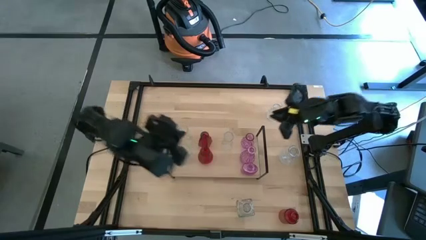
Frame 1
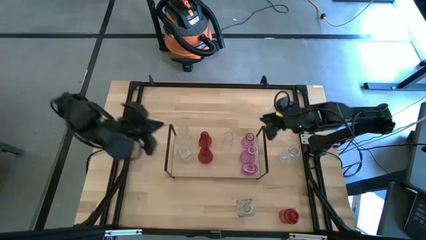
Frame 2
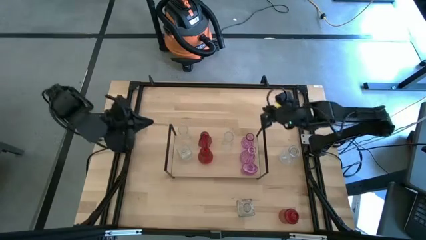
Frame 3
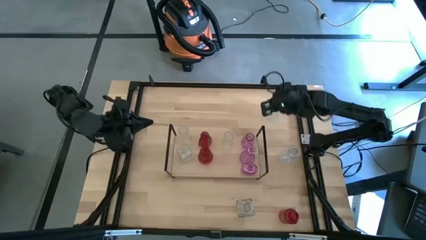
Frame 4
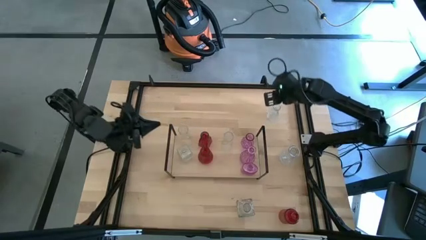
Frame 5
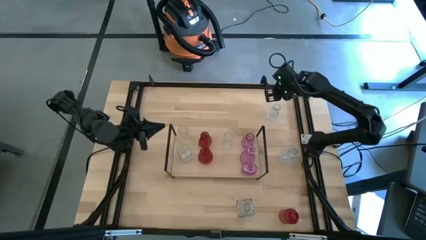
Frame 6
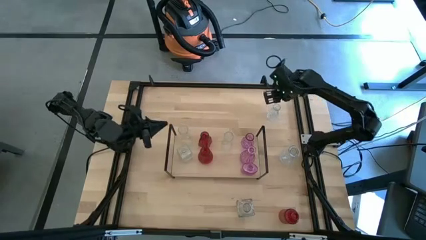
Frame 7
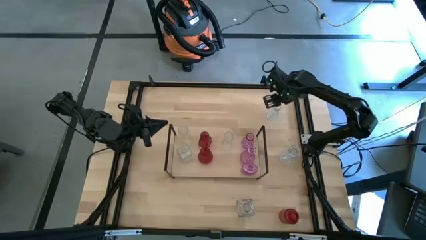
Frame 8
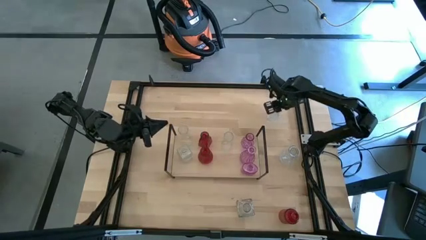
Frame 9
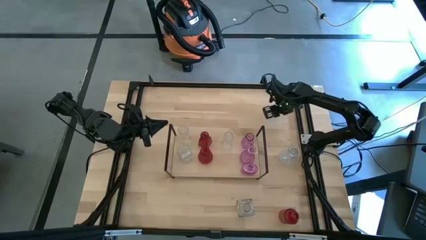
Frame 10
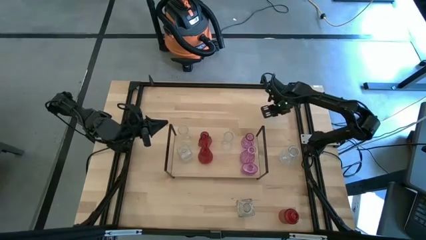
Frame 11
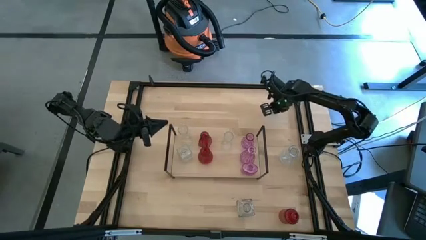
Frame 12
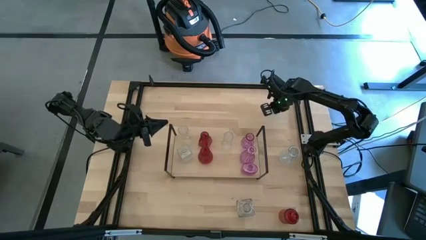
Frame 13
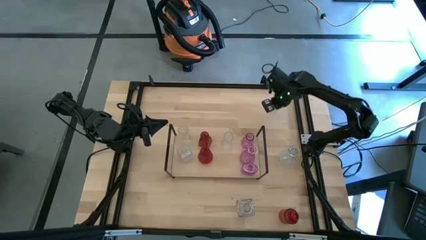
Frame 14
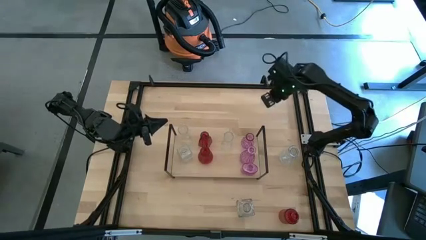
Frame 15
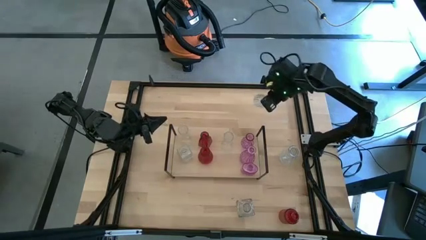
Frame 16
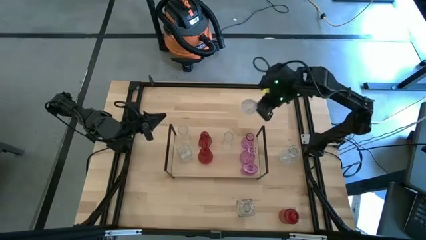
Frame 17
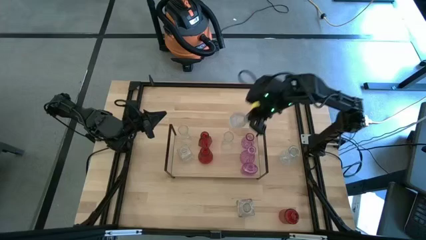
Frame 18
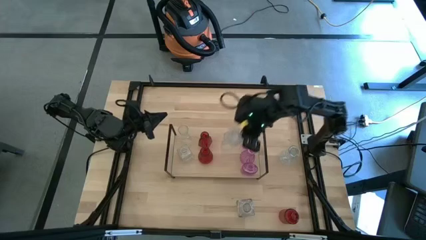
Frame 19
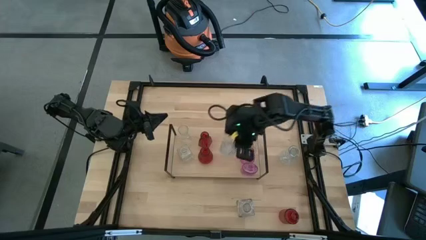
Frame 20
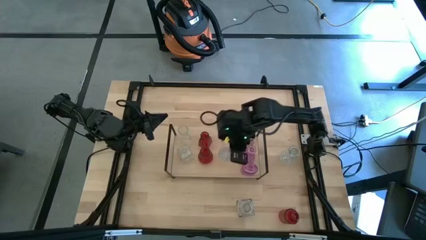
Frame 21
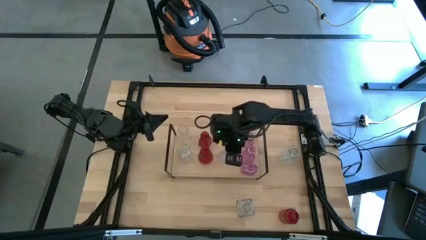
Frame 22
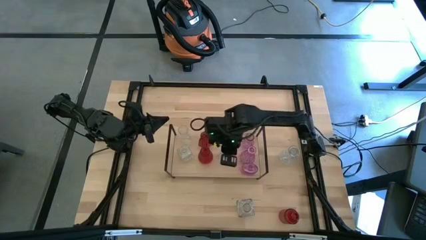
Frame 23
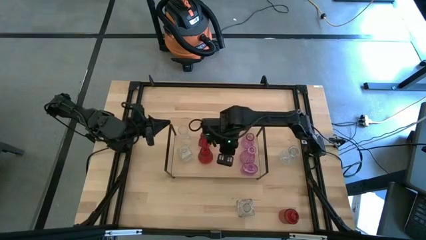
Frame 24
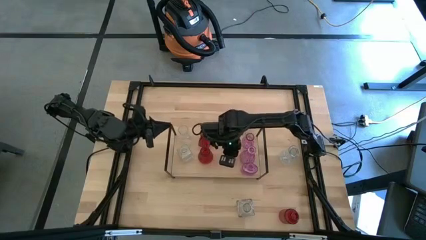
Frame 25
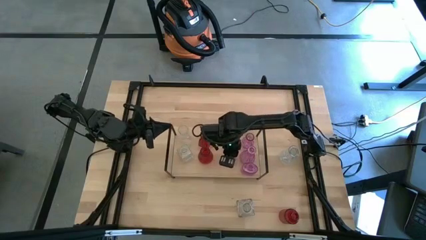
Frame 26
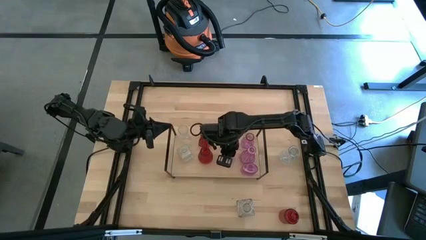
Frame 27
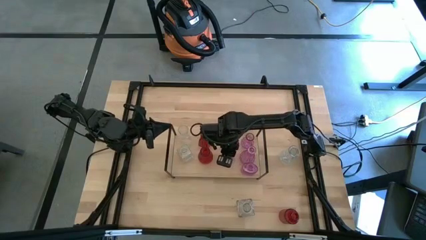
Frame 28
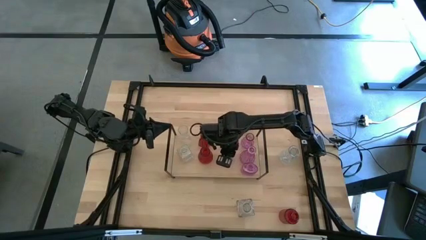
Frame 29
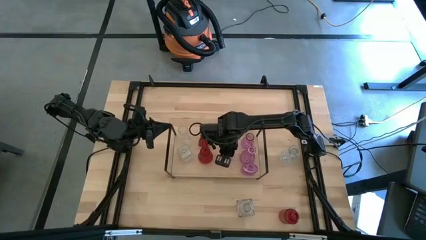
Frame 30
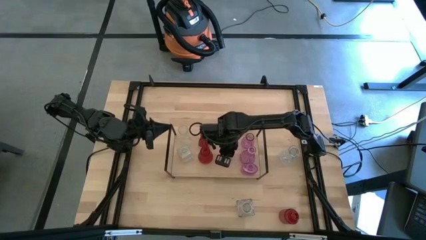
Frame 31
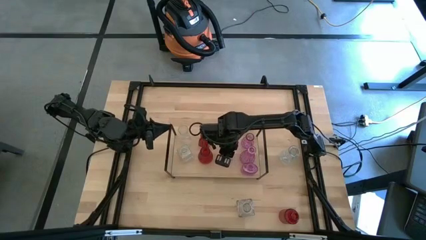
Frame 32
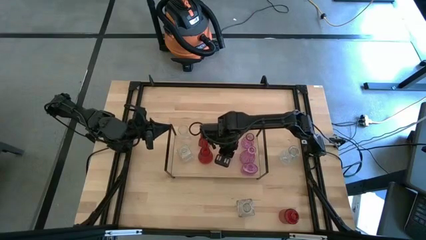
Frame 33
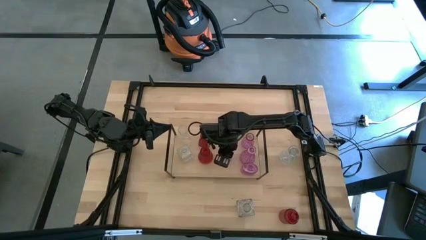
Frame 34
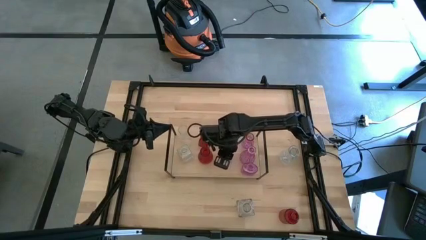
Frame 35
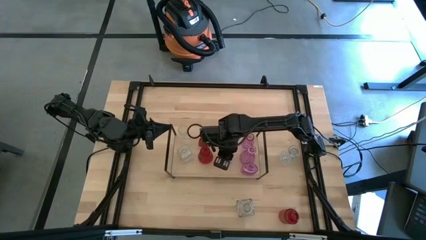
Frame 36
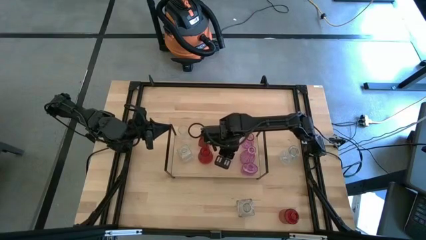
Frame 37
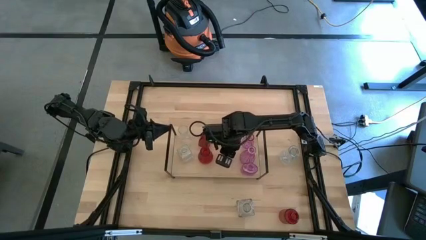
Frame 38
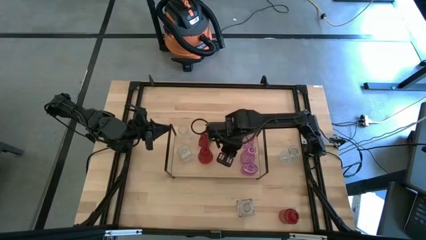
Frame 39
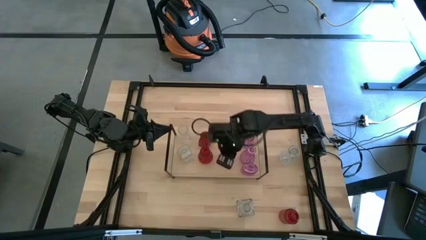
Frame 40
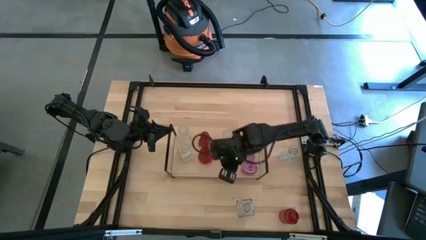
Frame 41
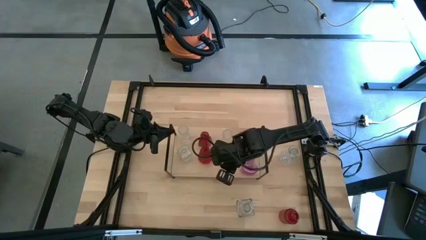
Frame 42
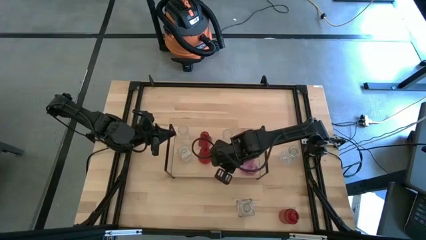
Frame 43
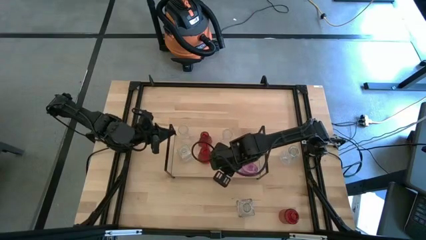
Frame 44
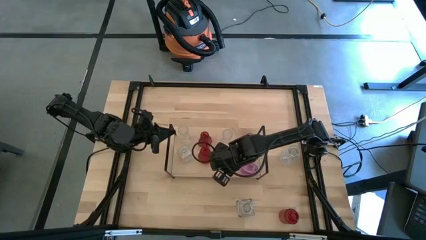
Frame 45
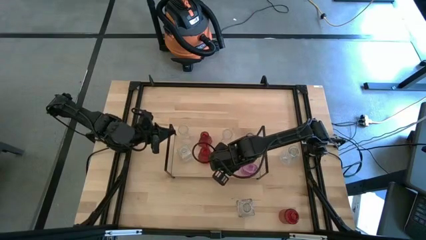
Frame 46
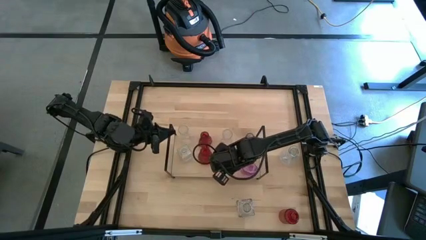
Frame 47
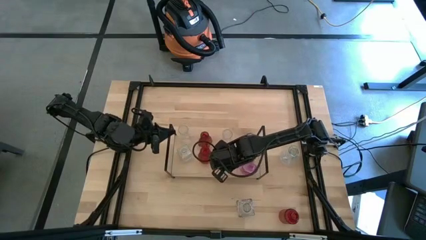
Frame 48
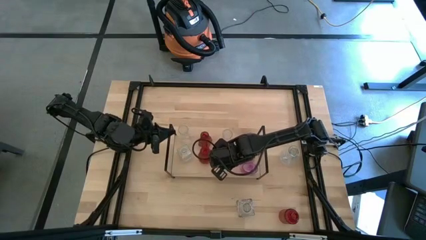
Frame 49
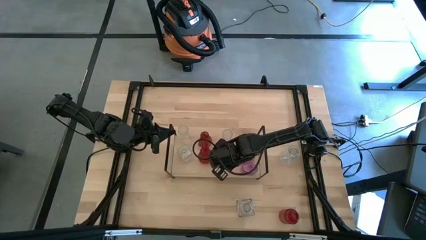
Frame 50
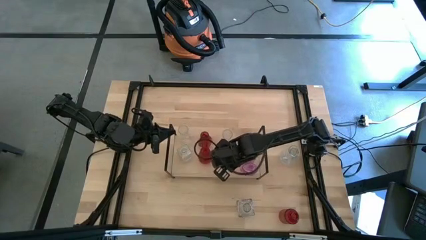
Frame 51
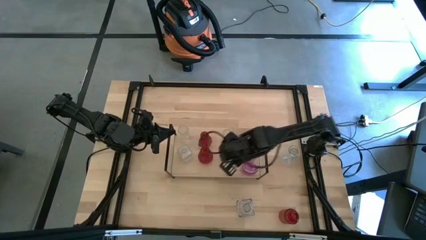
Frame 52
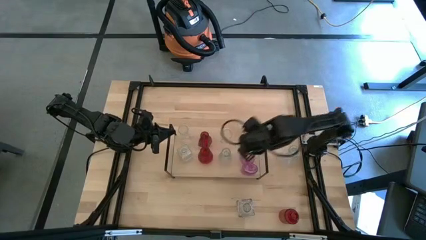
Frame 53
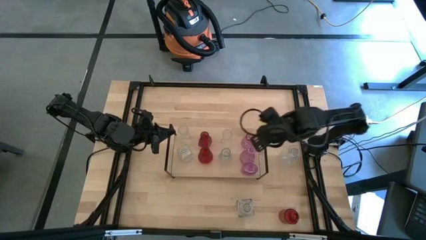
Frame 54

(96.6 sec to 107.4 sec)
Task: sort vases onto shelf
Put the transparent flower vase on the shelf aligned with the other transparent flower vase
